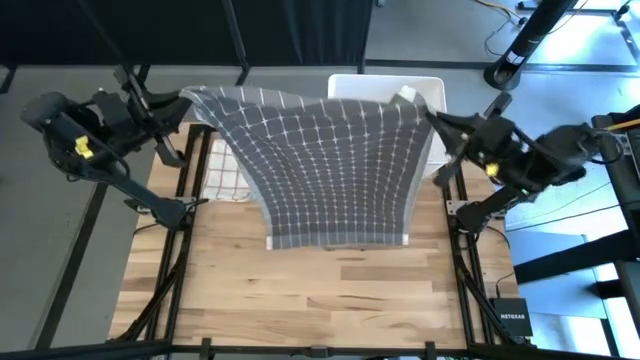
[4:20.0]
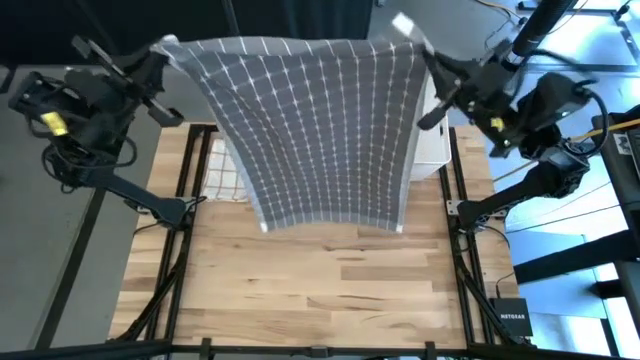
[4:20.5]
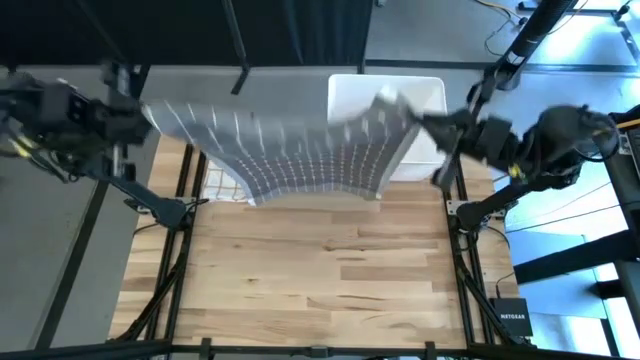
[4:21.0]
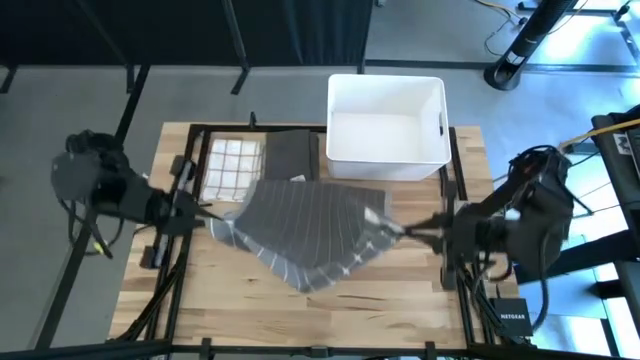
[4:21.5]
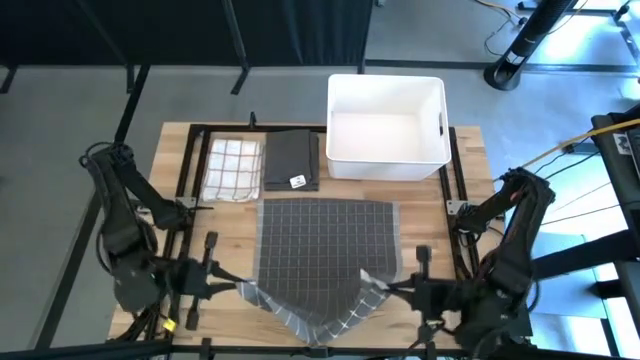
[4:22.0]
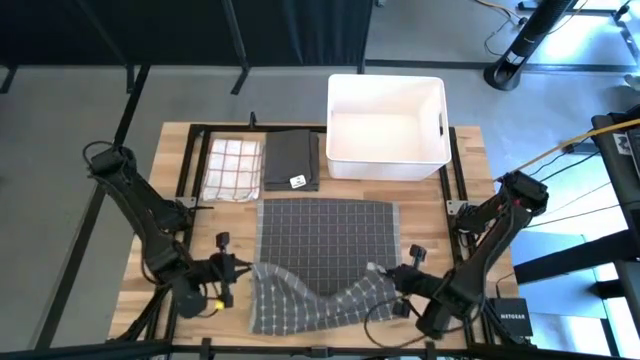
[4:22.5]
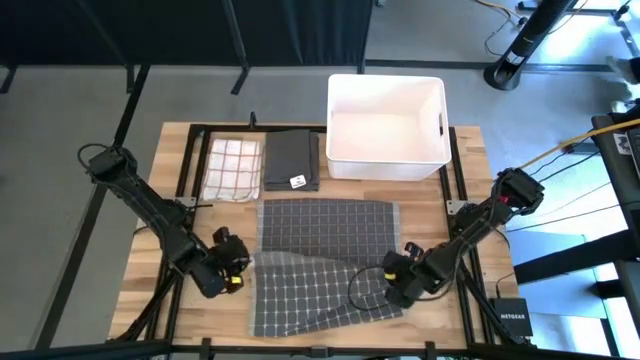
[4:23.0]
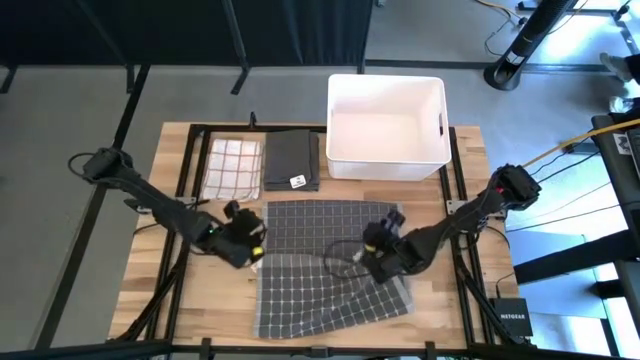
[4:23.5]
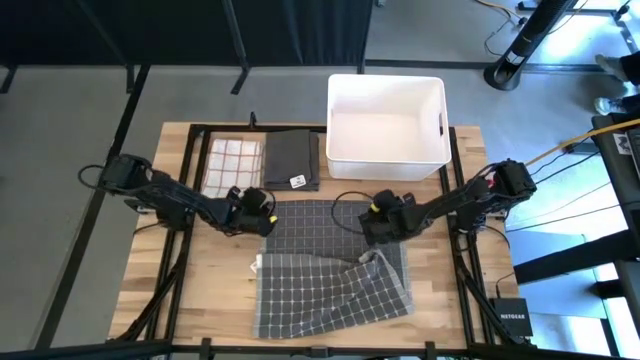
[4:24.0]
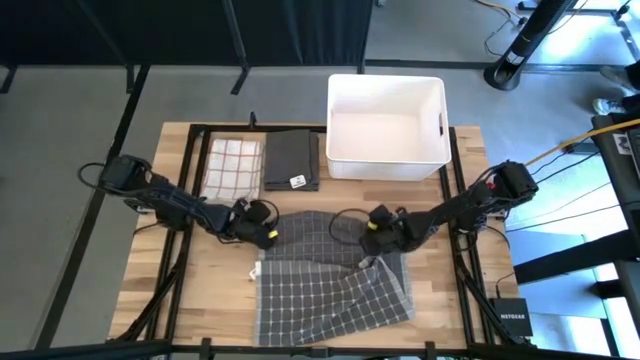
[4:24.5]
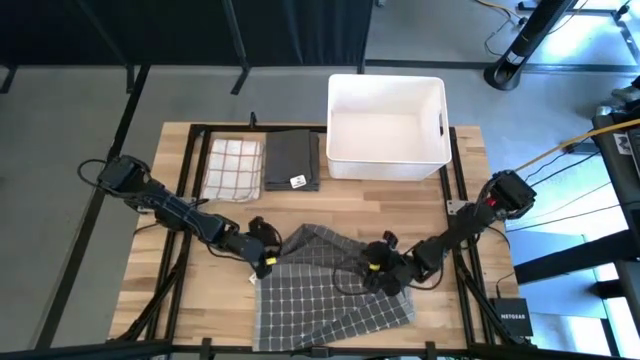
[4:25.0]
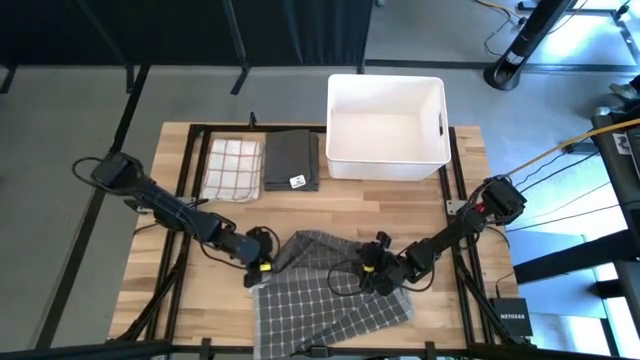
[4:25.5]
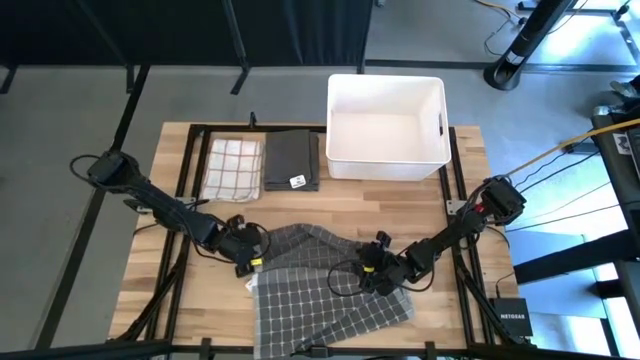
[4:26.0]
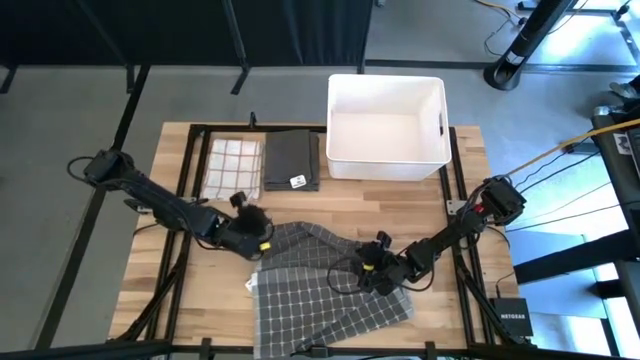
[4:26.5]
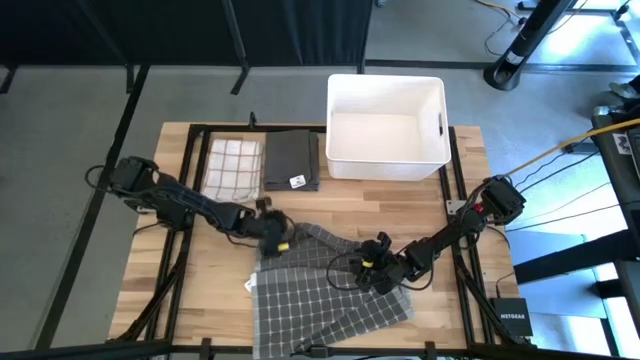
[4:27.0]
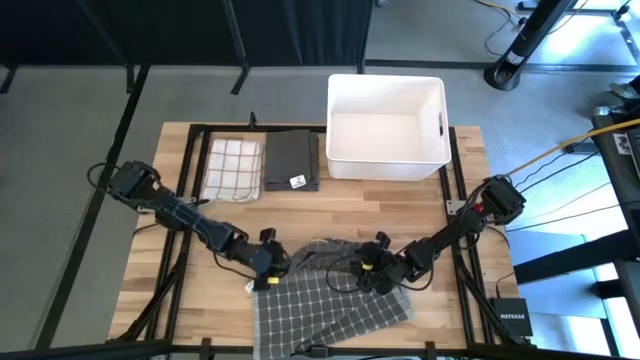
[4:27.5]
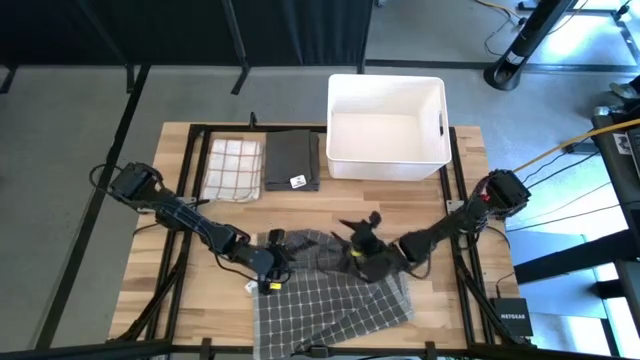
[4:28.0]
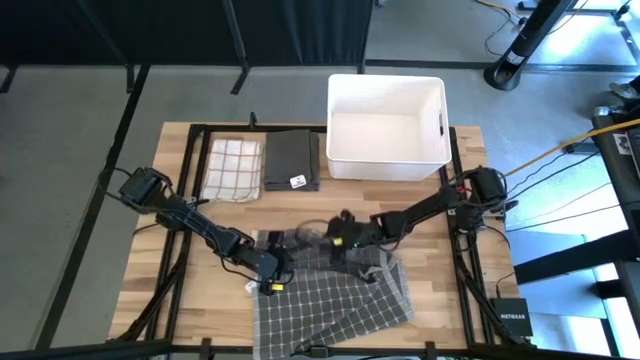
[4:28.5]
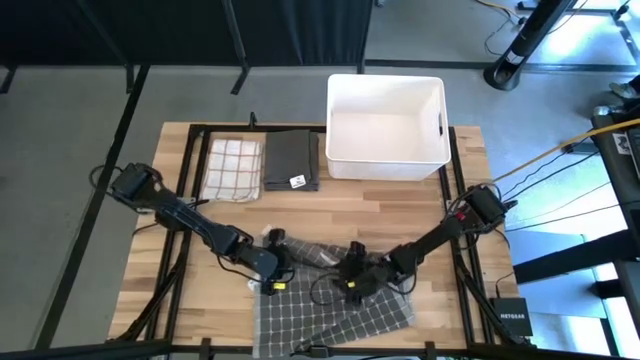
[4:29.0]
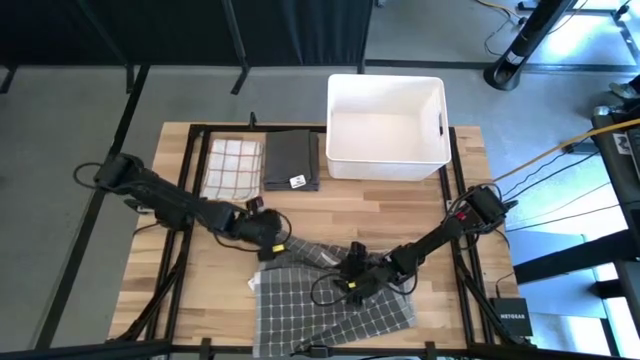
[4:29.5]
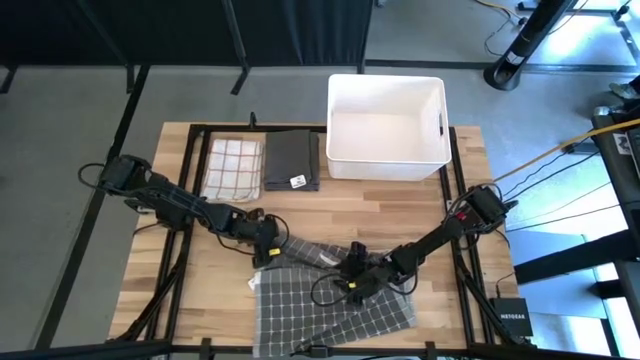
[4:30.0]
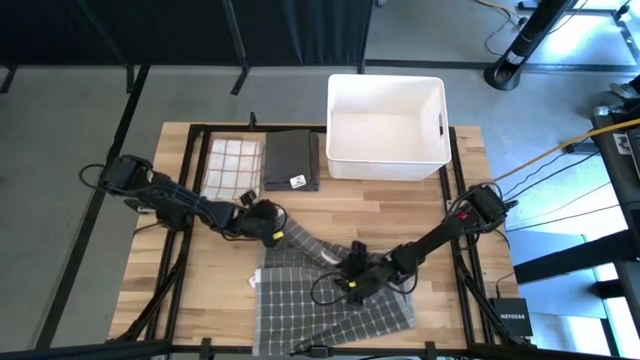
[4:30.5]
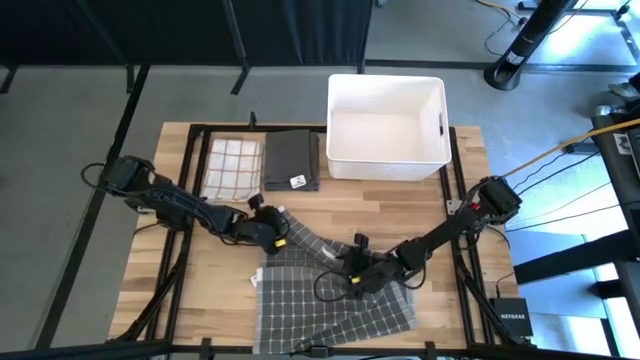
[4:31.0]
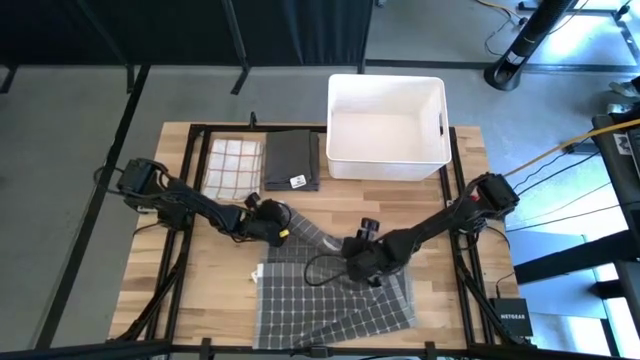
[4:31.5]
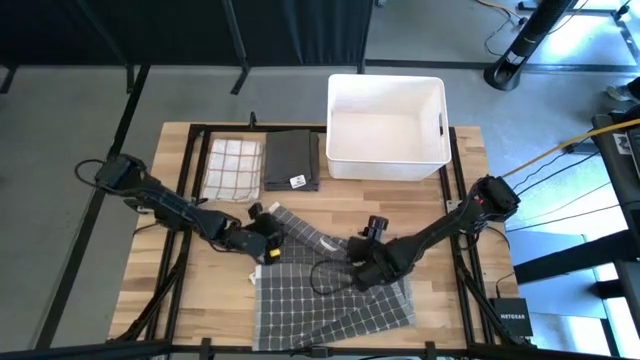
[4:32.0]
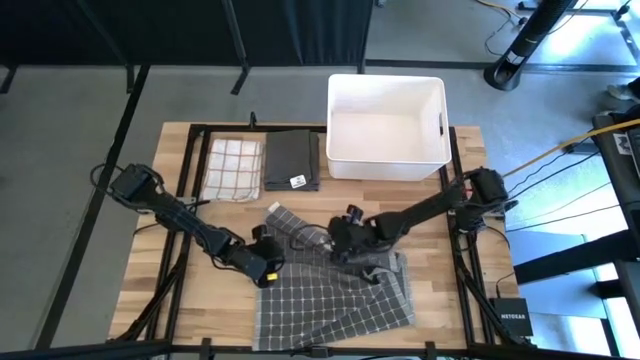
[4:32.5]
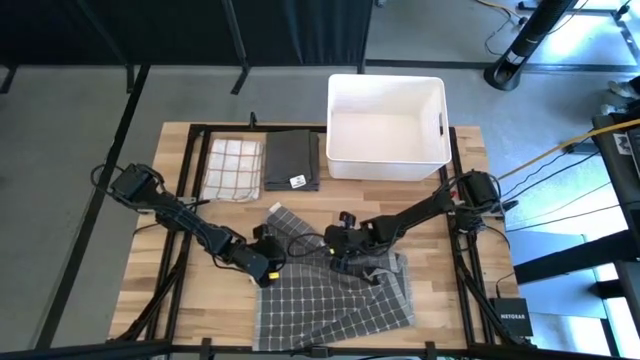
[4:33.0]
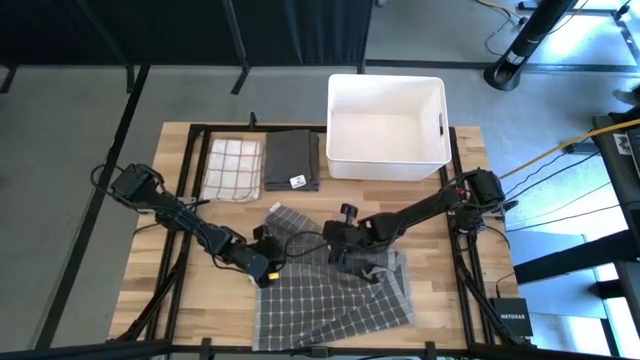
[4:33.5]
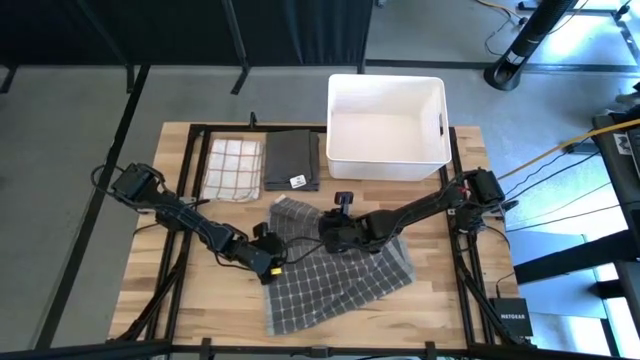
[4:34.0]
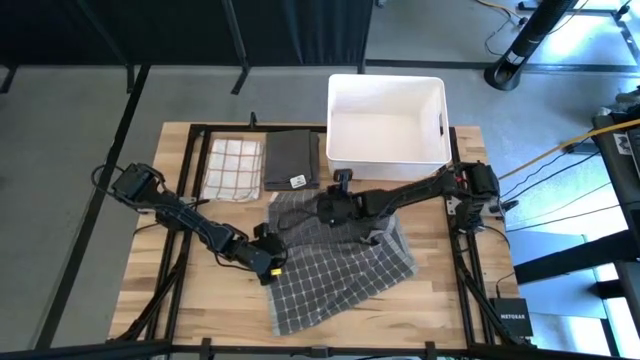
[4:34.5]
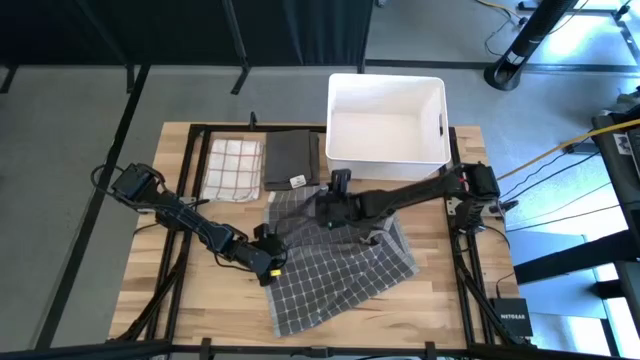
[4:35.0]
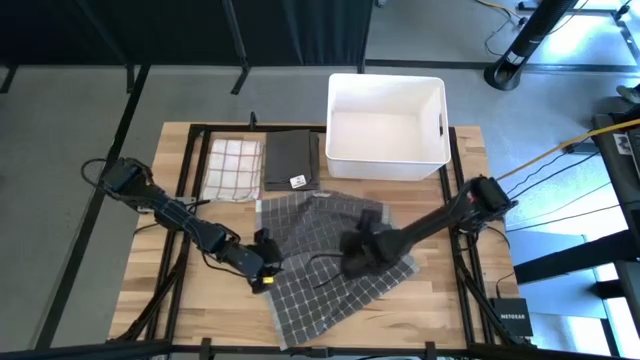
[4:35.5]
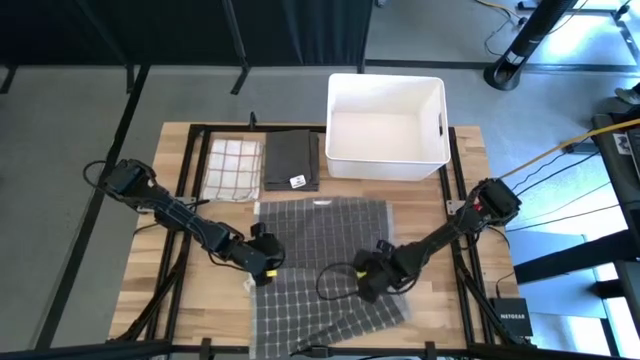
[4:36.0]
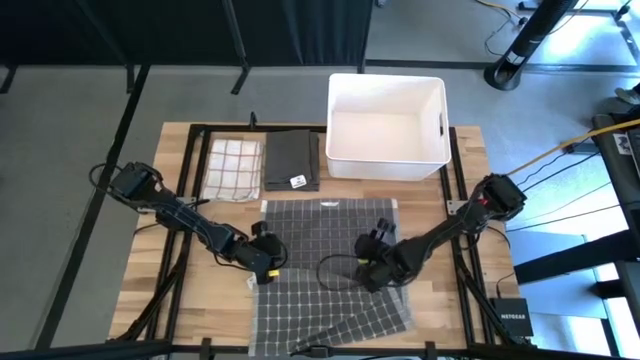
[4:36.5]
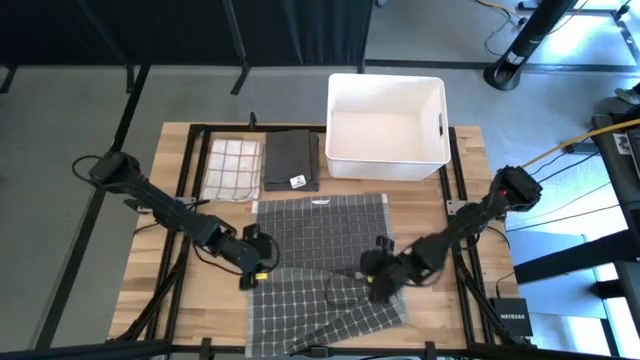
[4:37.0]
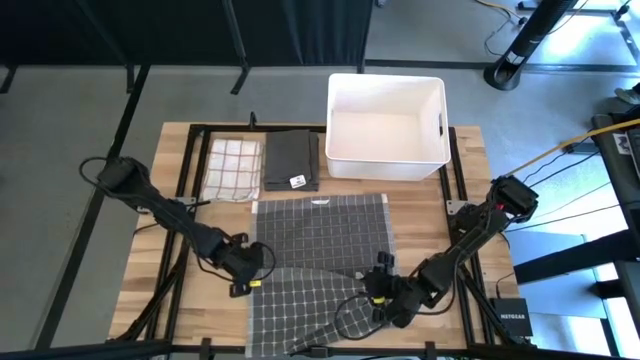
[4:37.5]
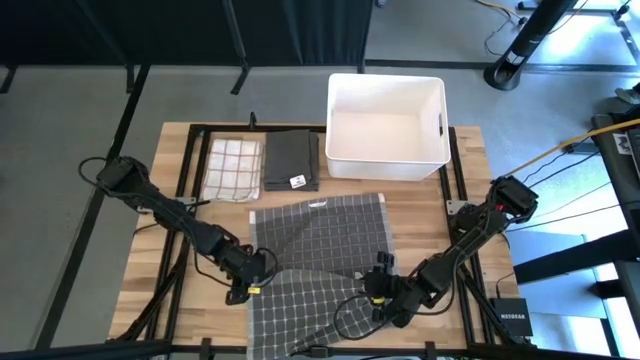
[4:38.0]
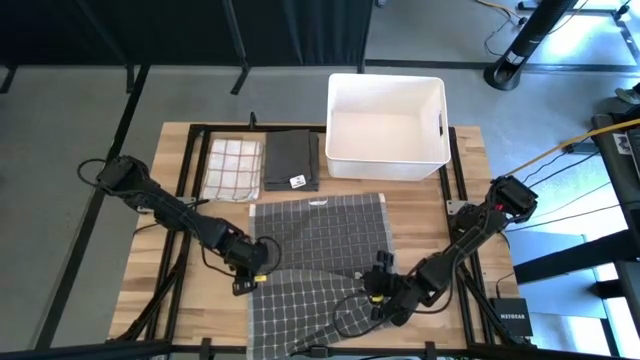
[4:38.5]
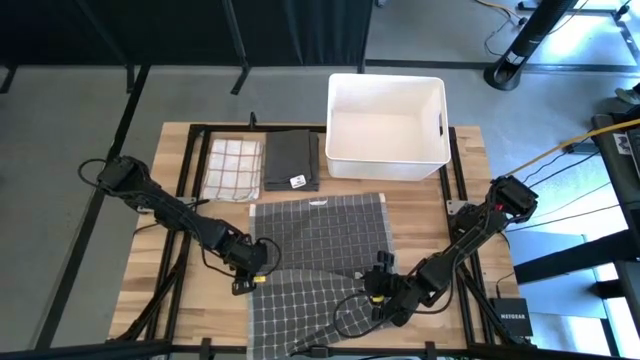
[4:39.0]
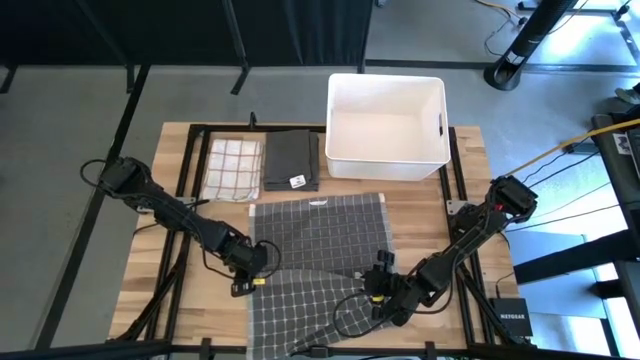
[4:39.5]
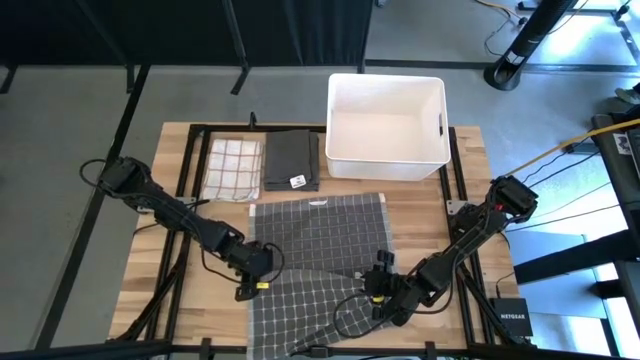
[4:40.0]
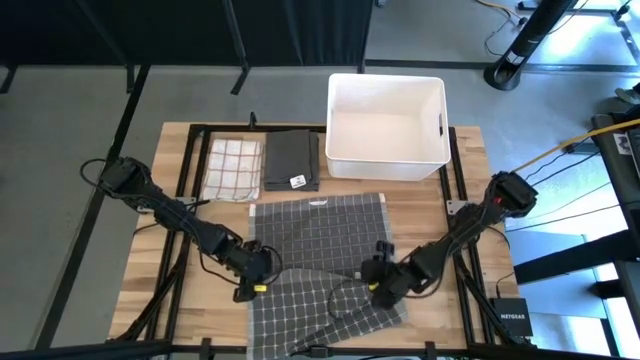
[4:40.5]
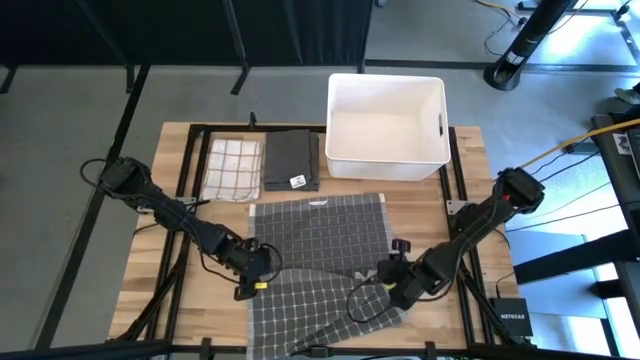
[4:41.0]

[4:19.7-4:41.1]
Task: Fold towel
Fold the grey patterned towel
